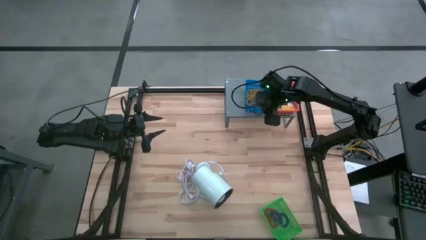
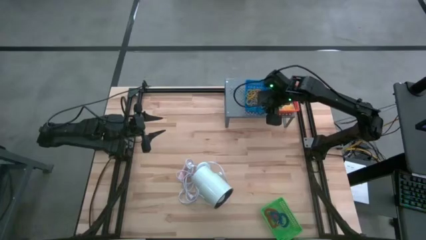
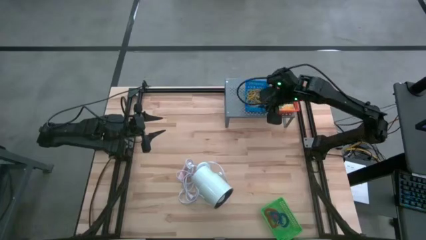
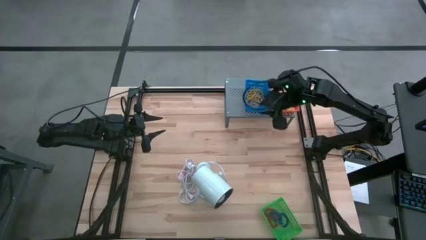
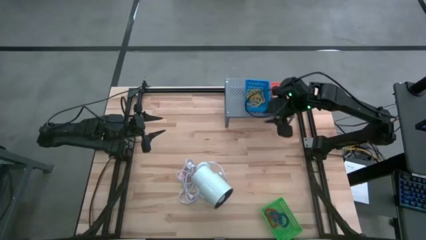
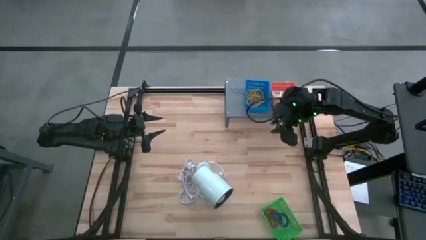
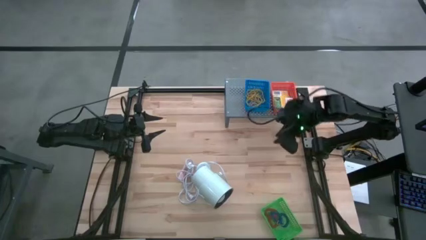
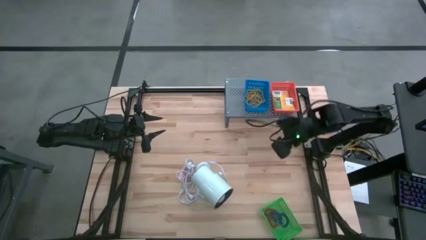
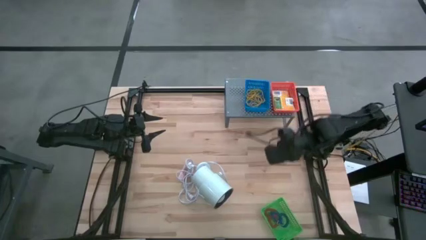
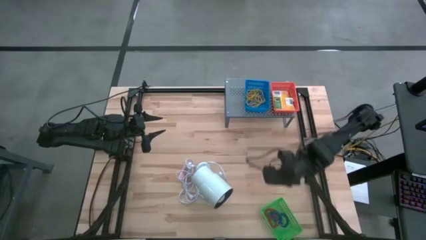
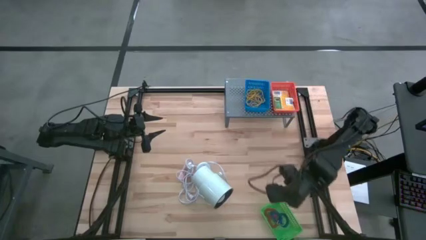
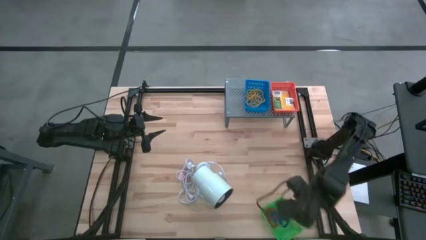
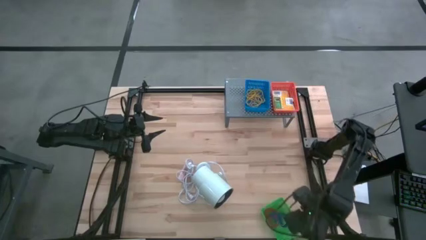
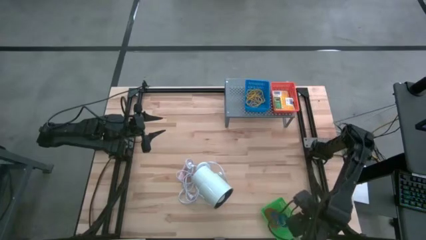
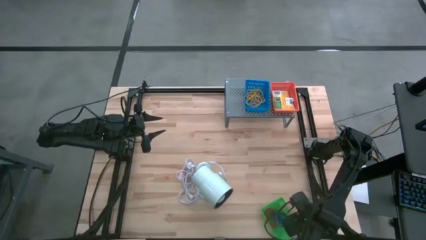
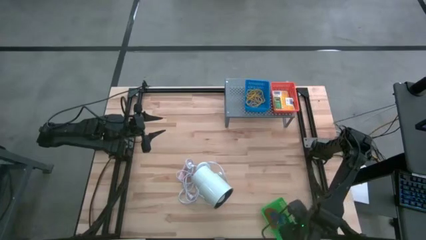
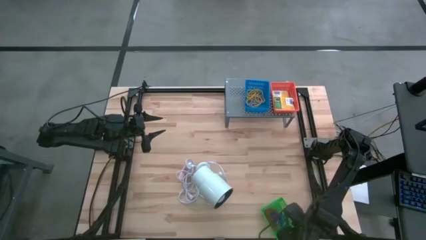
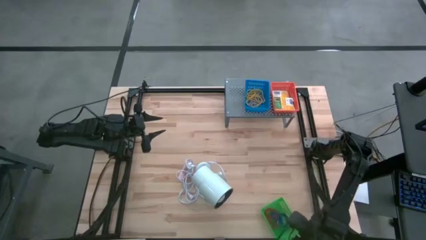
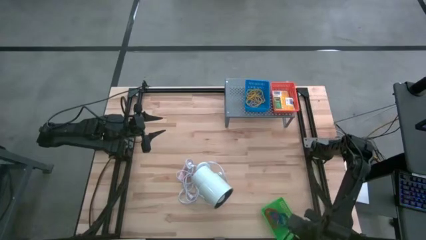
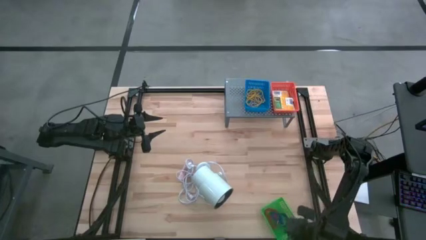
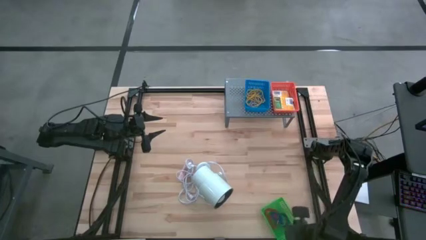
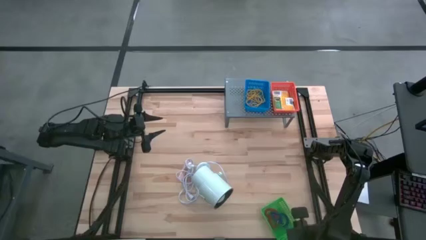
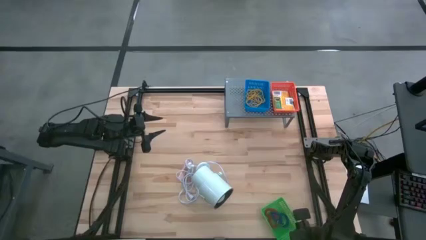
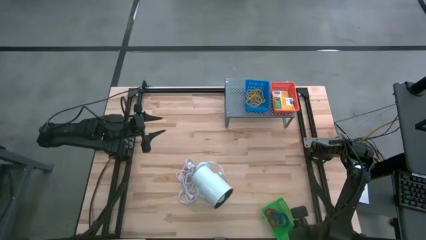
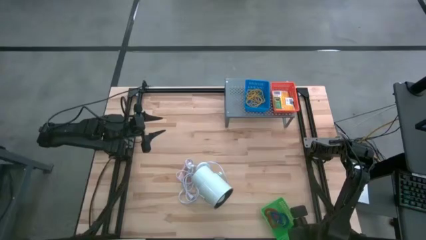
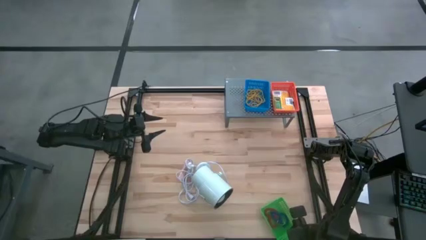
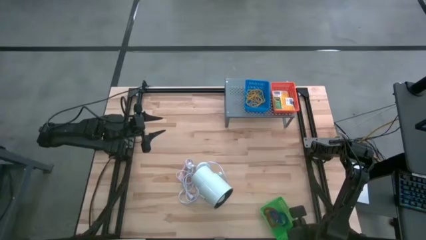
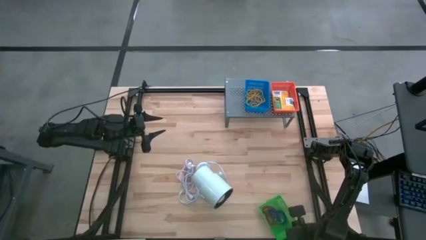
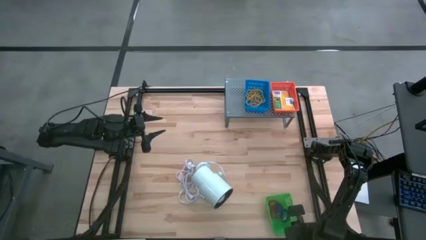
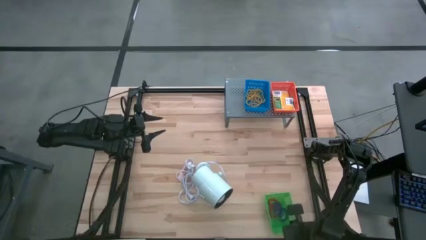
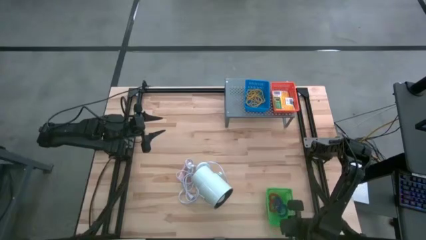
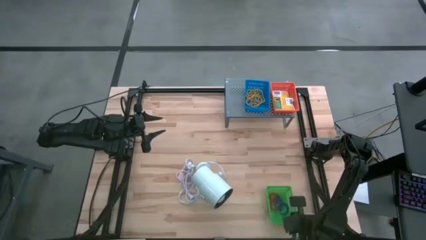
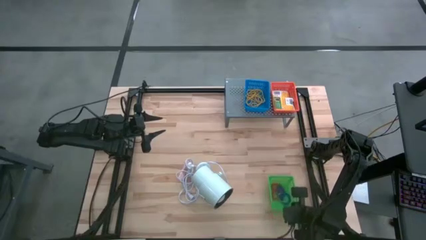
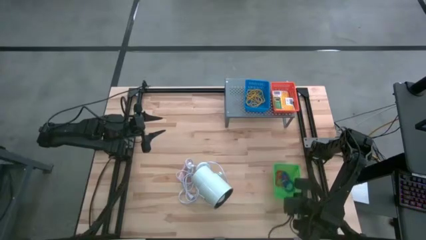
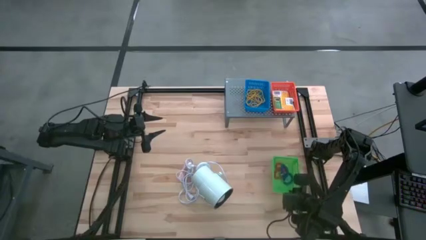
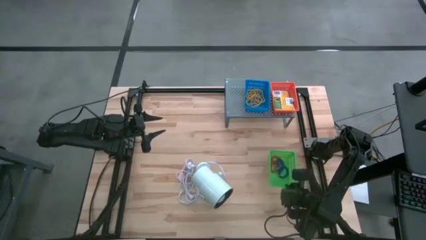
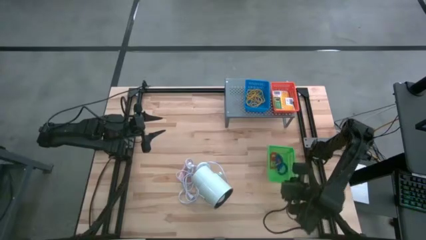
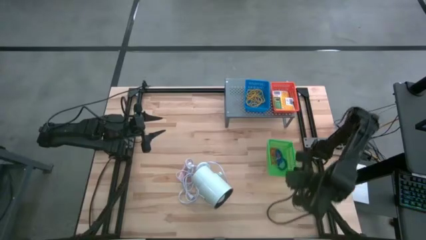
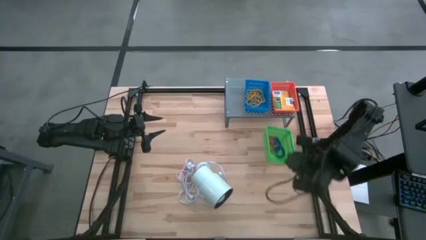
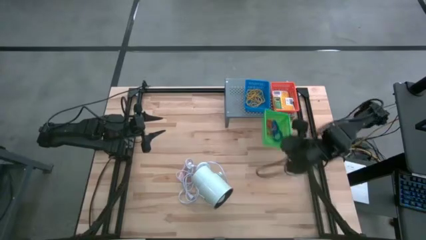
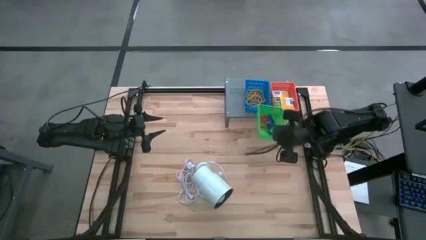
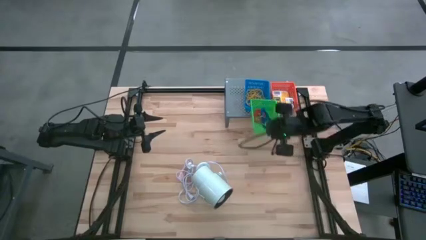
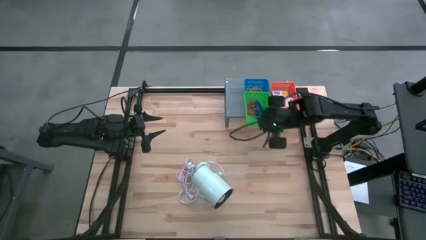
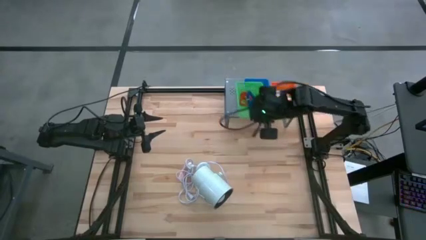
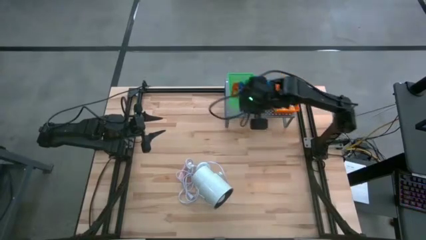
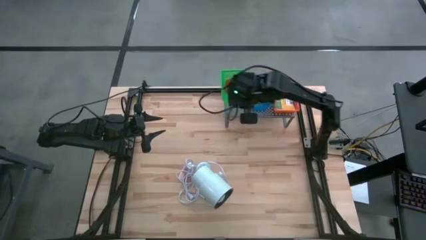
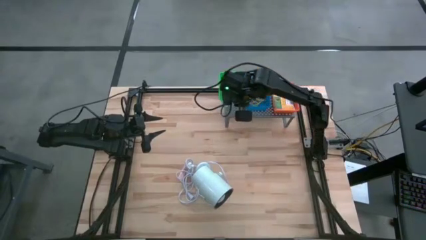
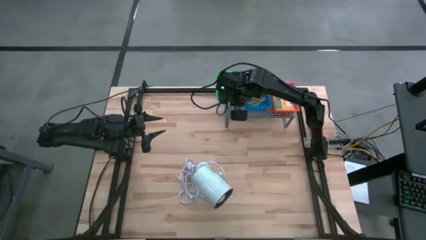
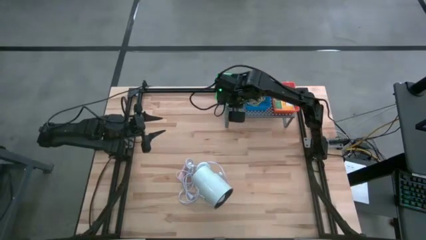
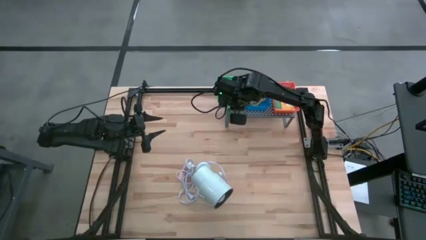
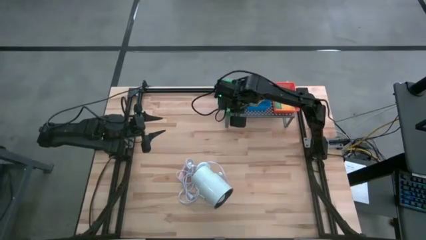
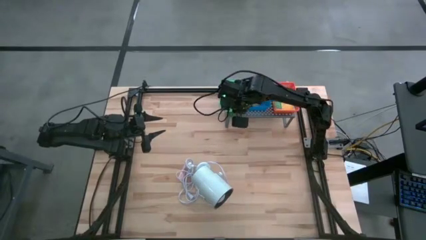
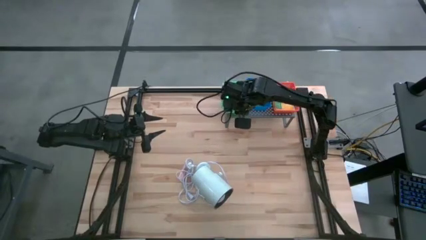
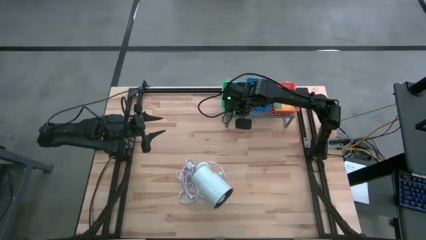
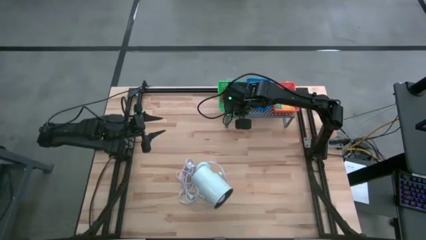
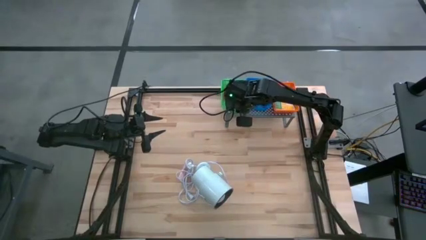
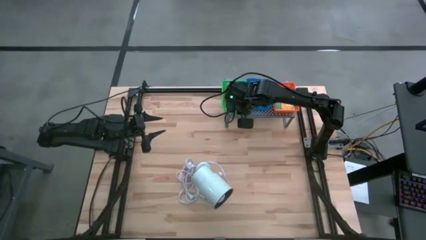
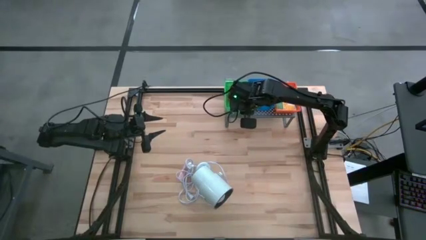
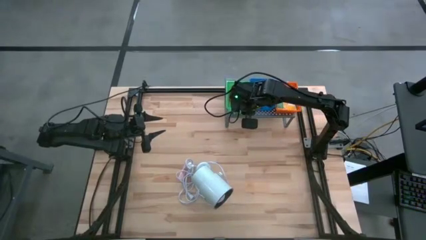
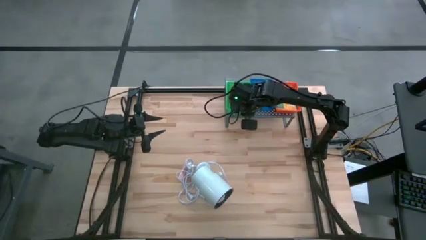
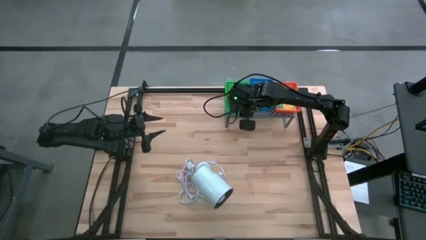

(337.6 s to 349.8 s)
Task: Pick & Place Office Desk Supplies
Put the green bin with the sorted spring keychains on the shelf
